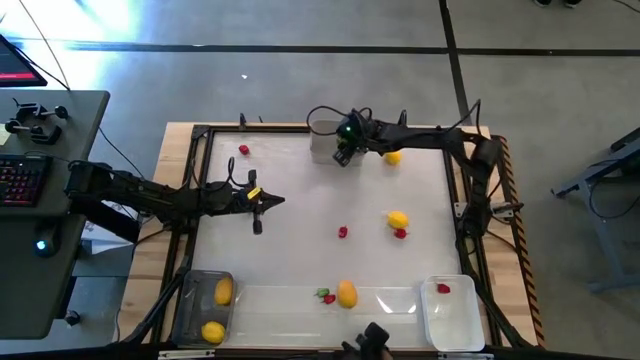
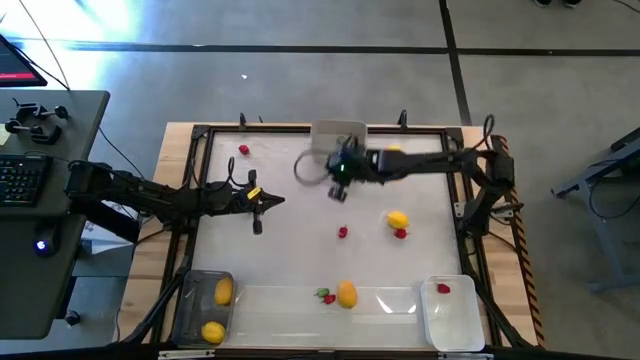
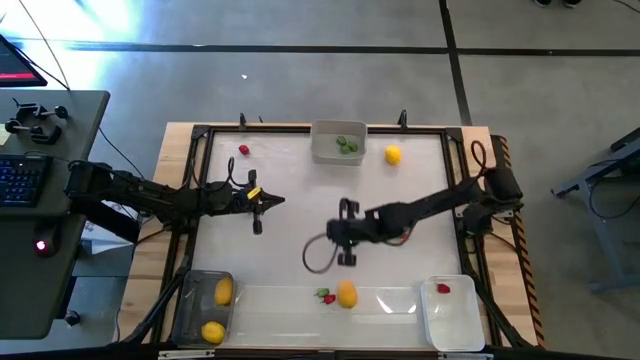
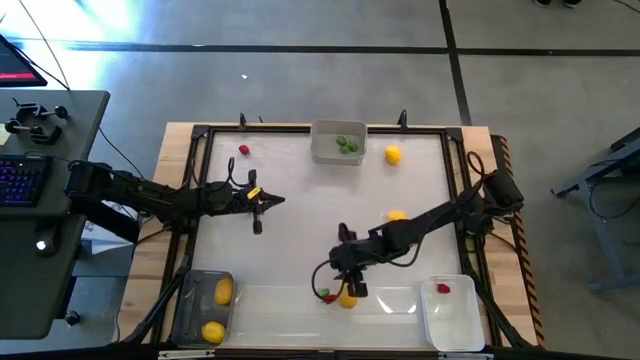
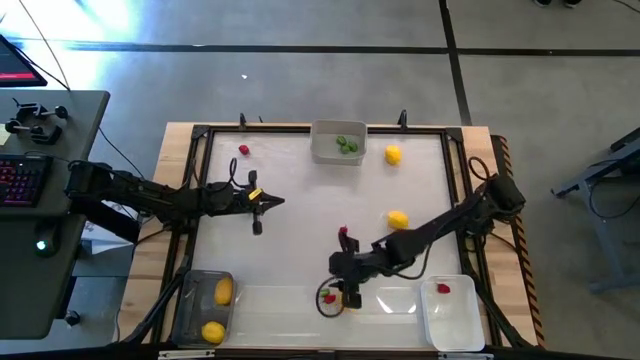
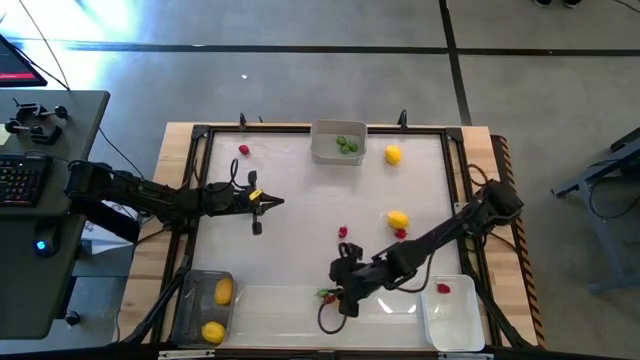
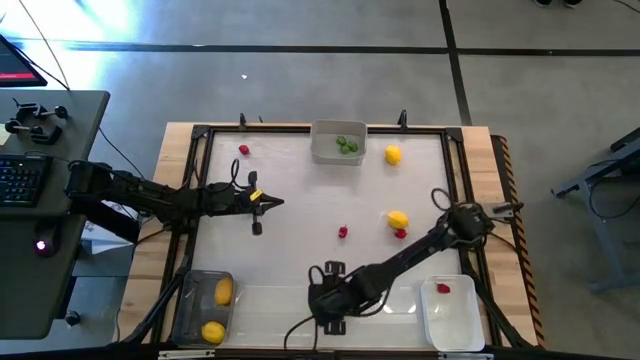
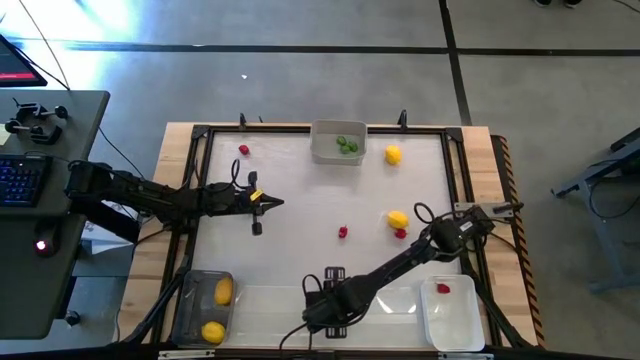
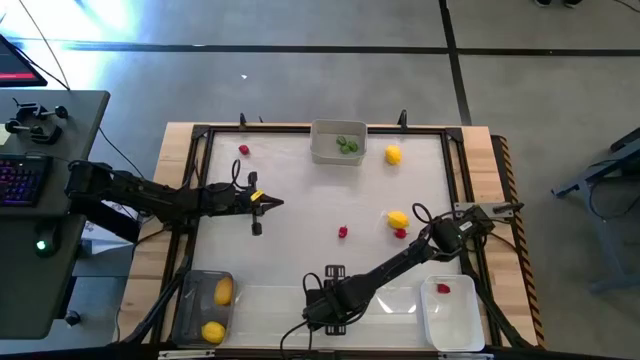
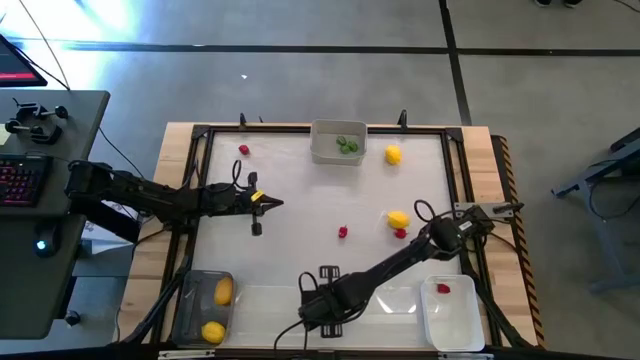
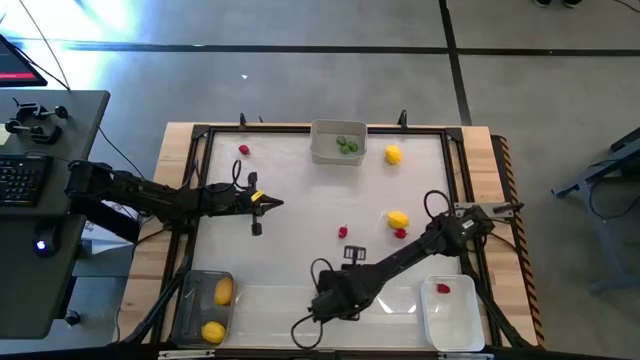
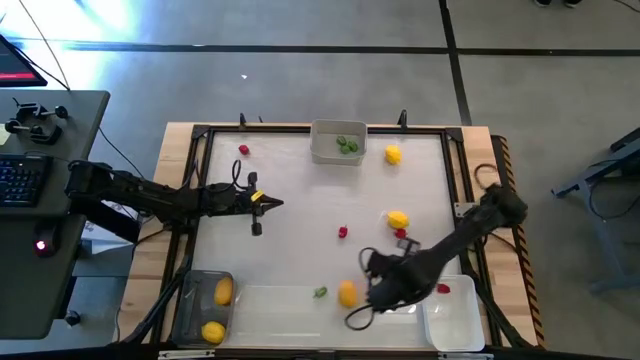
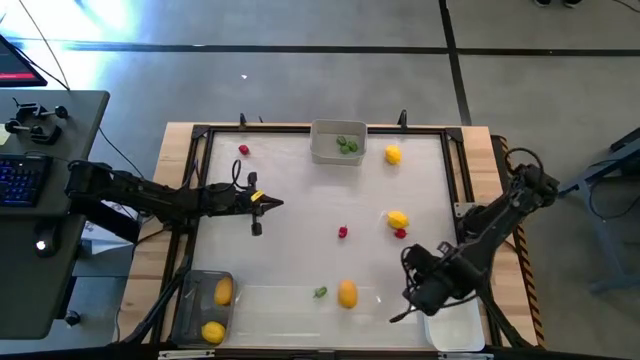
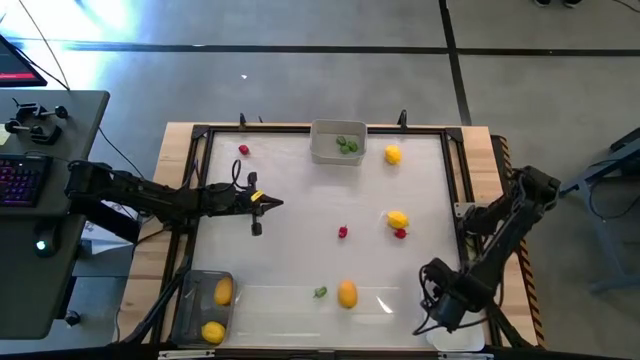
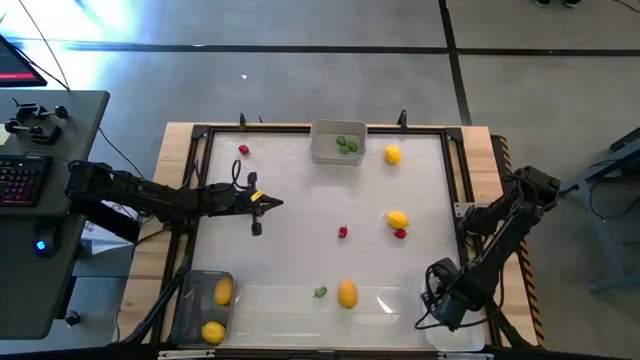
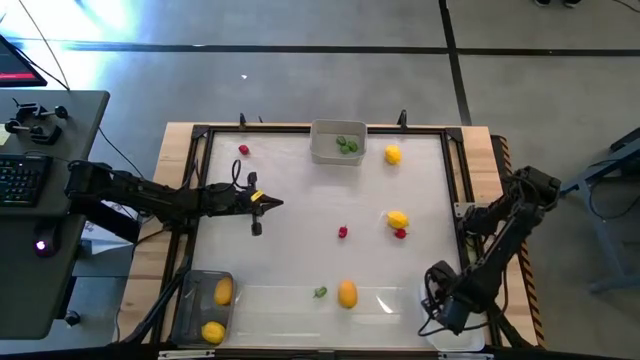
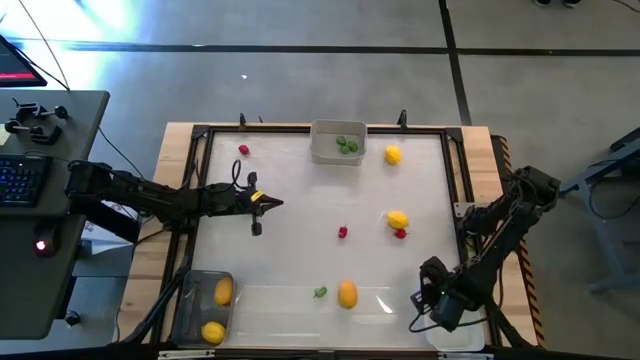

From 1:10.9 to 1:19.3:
Task: Sort produce into baskets
Put the red chili pepper into the white bin

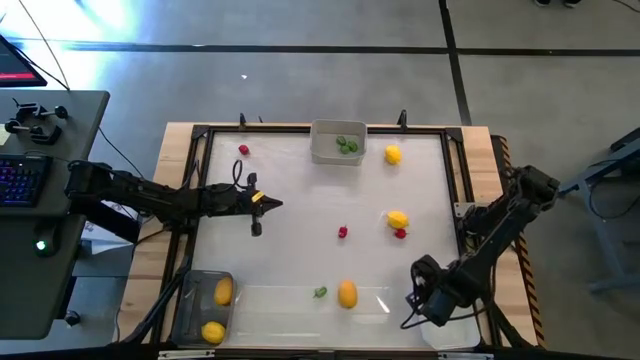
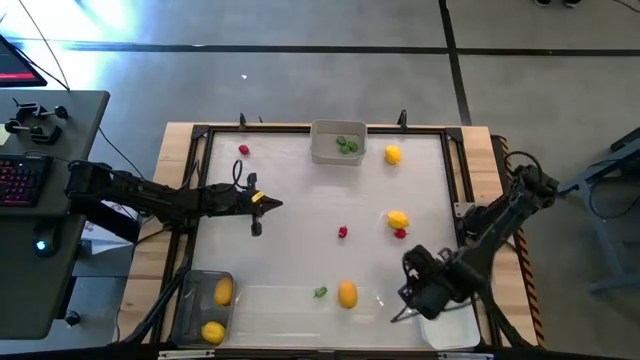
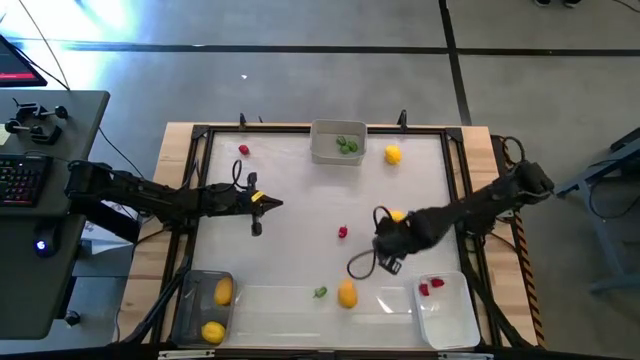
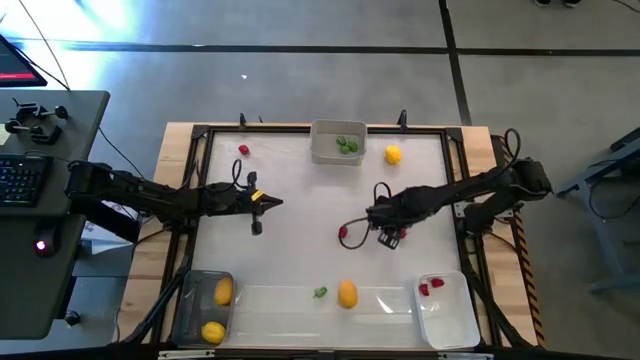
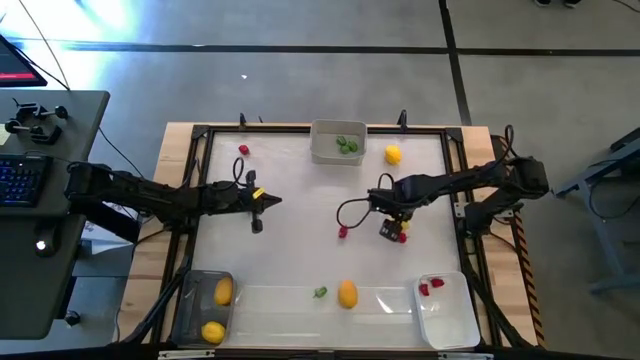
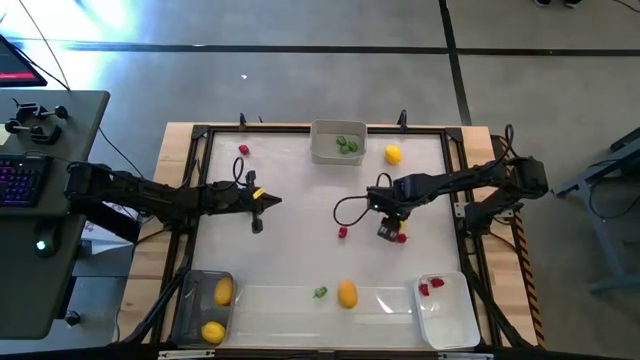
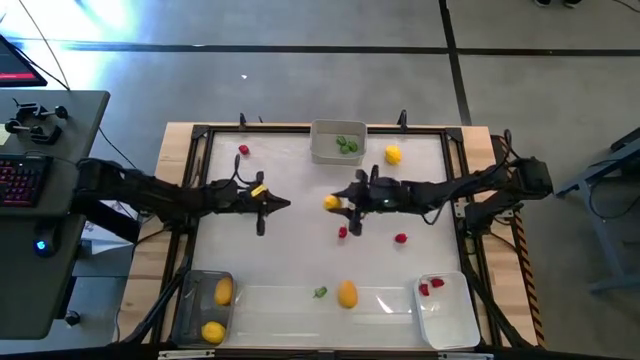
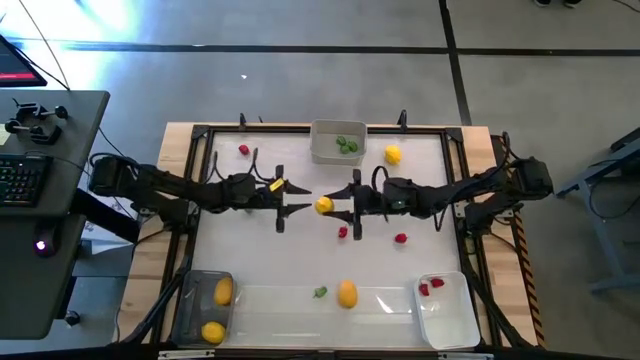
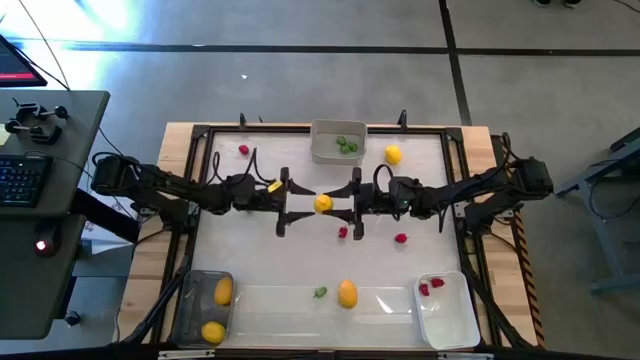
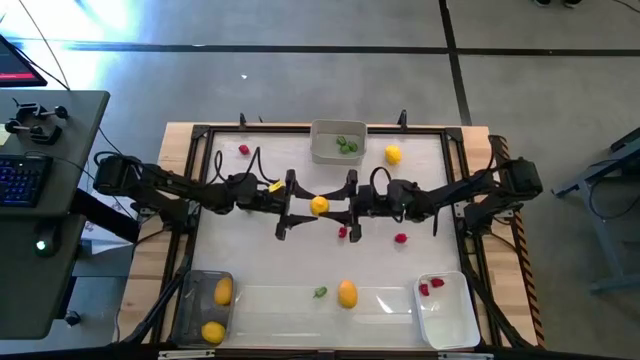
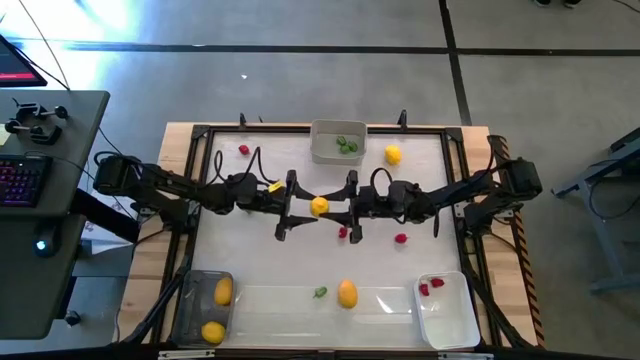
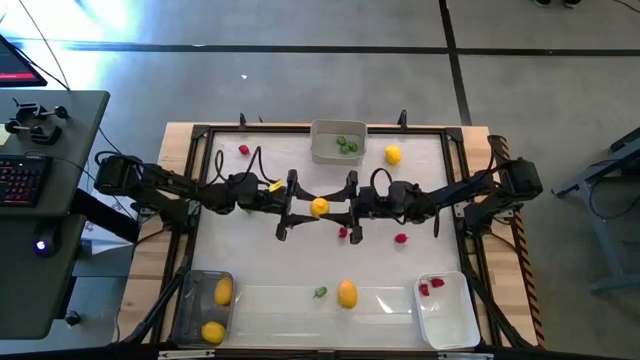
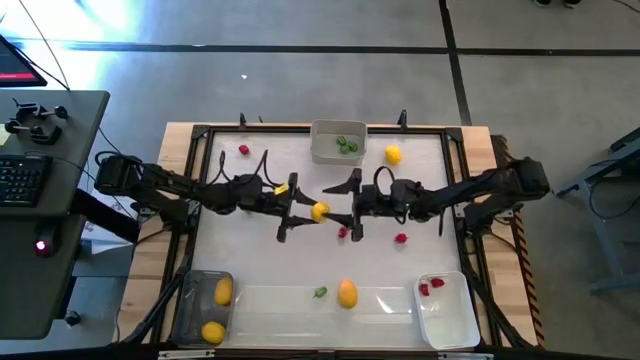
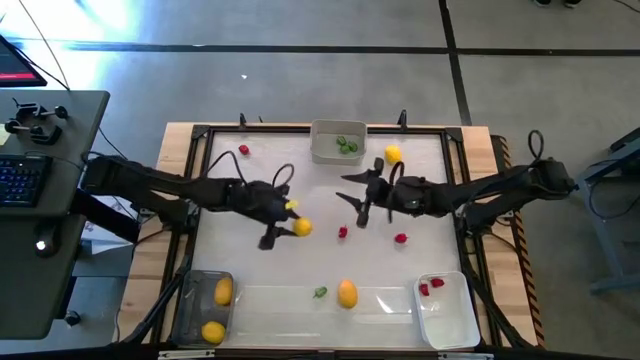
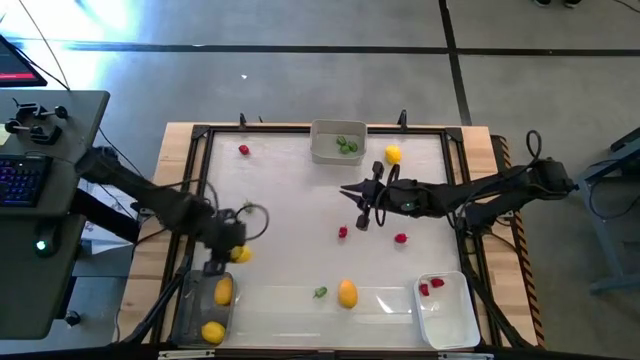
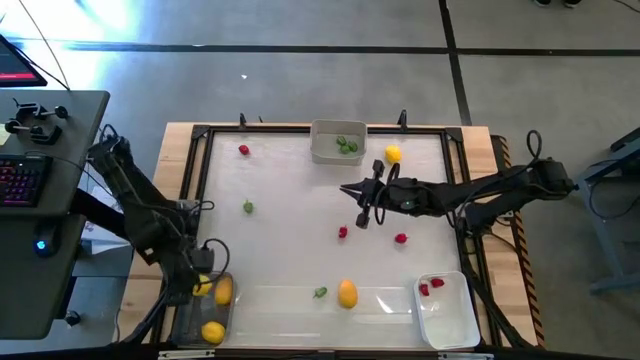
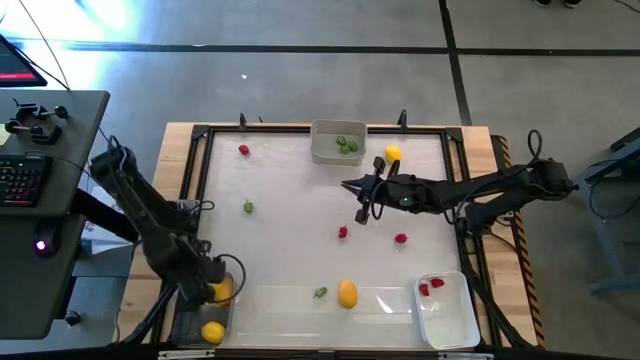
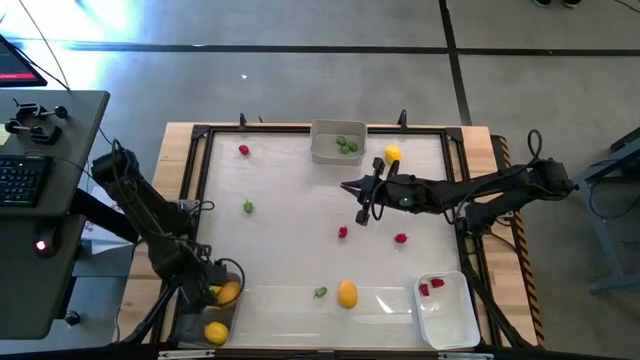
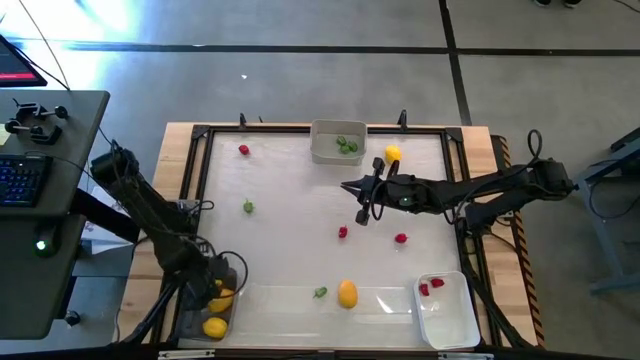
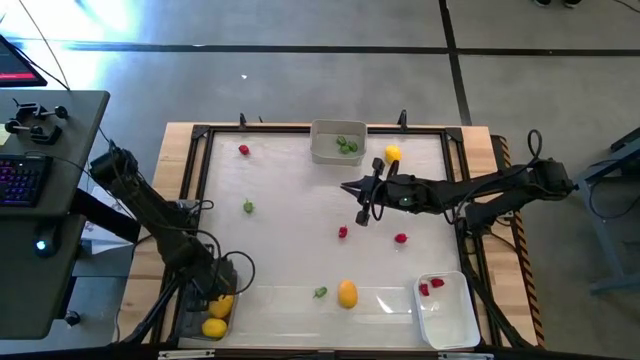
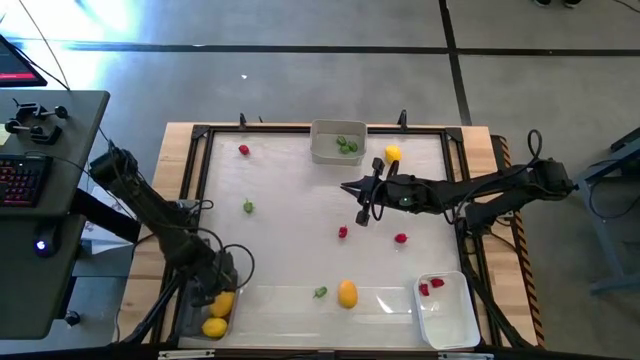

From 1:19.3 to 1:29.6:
Put the lemon into the black bin

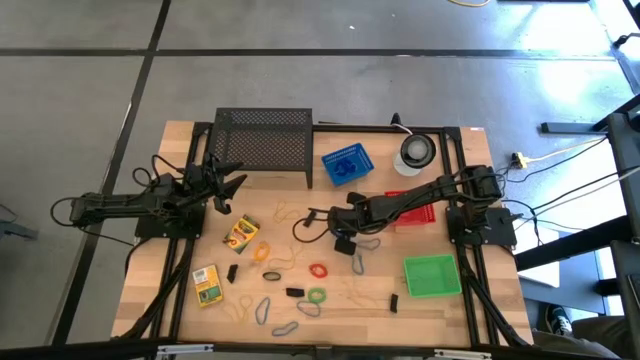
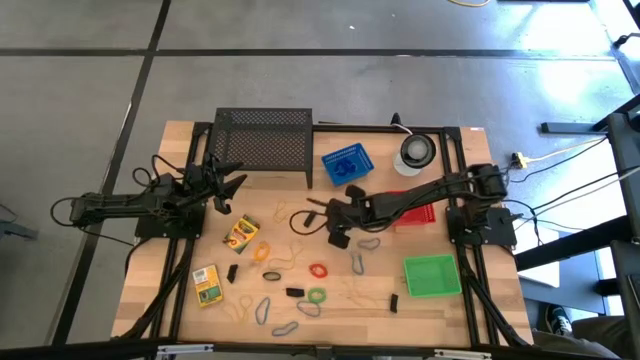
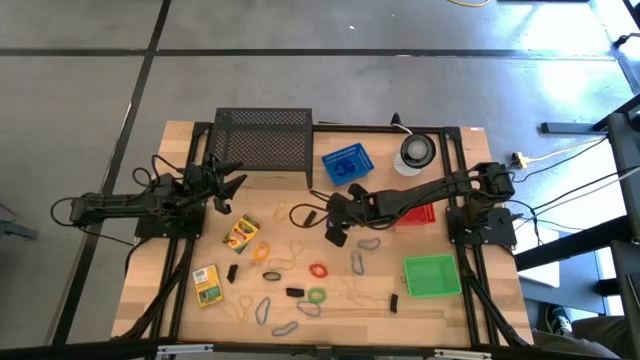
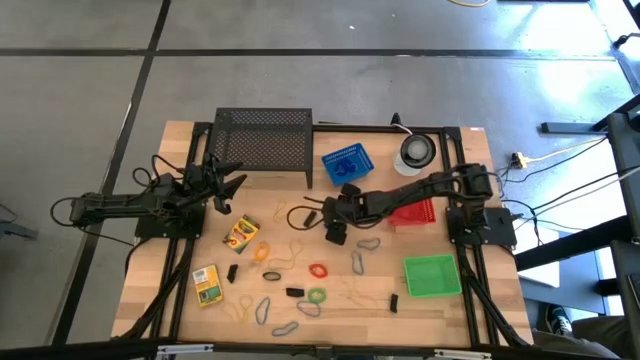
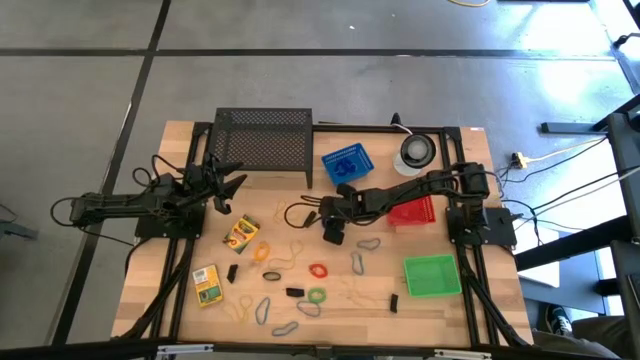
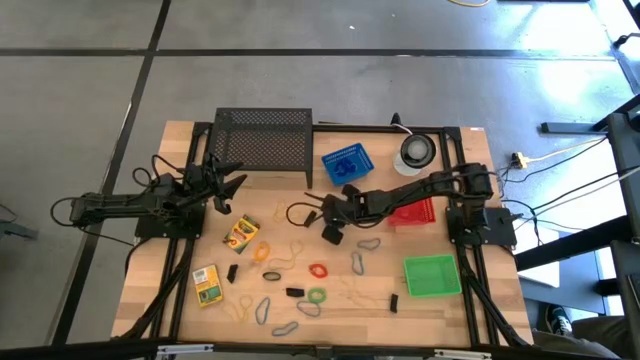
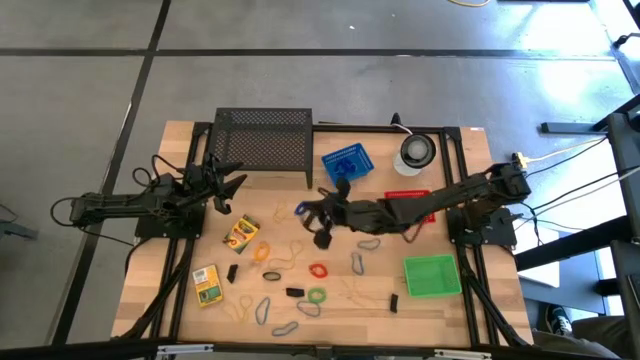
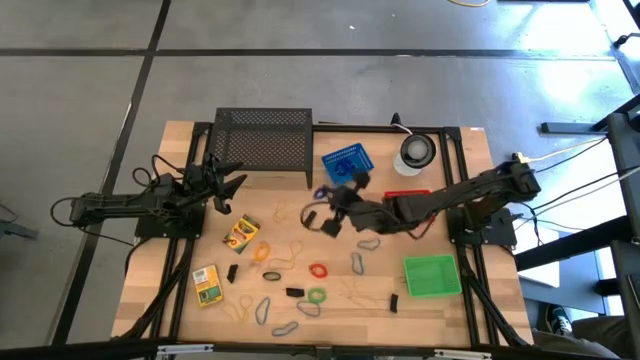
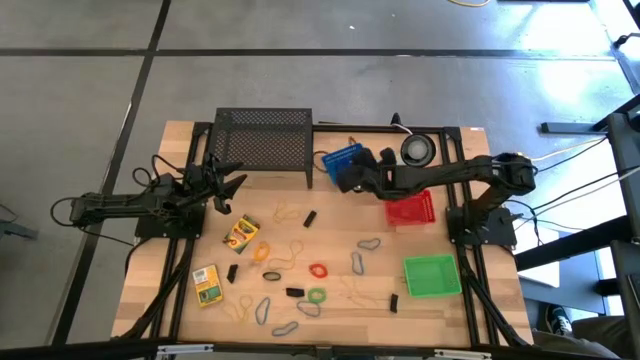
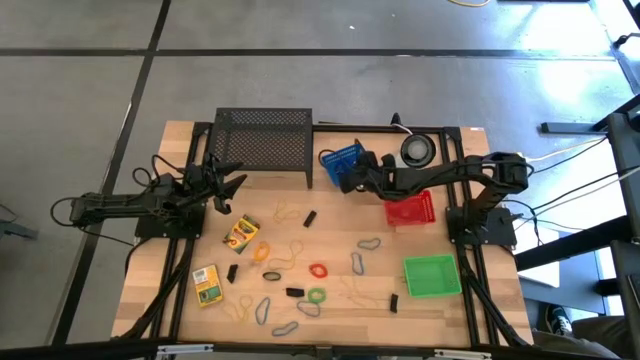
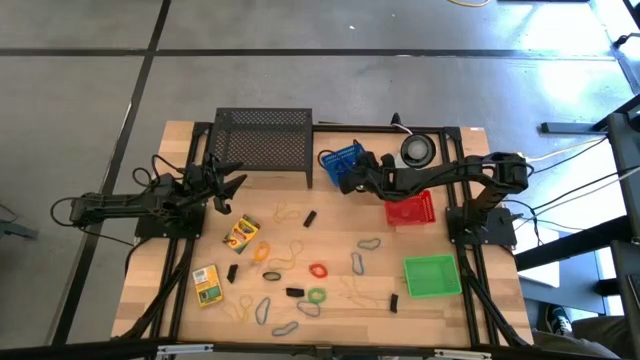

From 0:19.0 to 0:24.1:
Task: Pick & Place Office Desk Supplies
Put the blue wrist coil into the blue bin
